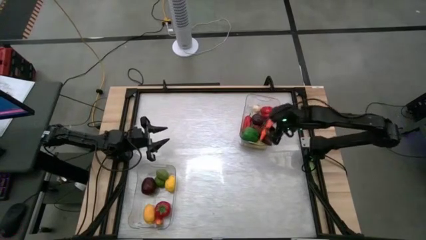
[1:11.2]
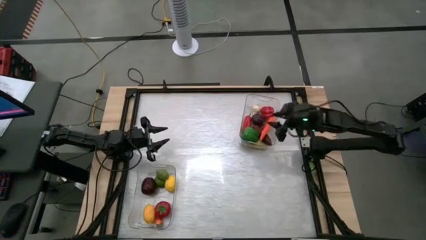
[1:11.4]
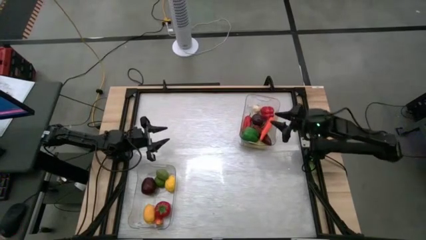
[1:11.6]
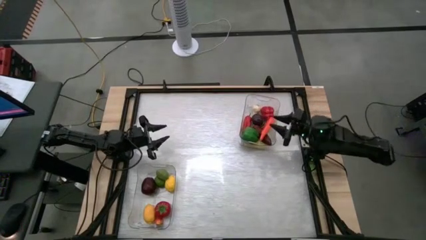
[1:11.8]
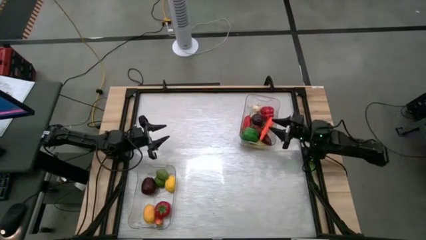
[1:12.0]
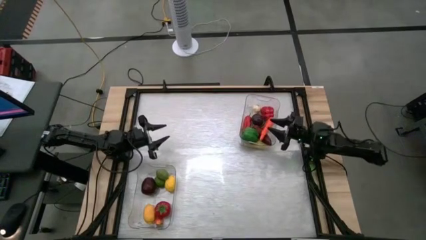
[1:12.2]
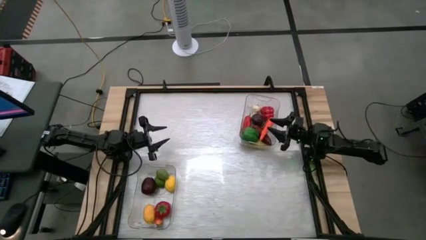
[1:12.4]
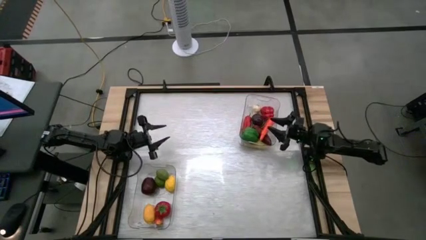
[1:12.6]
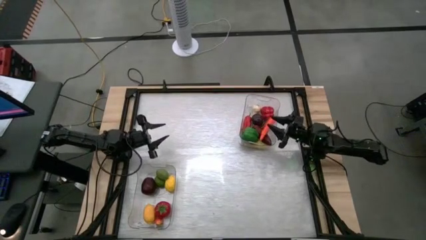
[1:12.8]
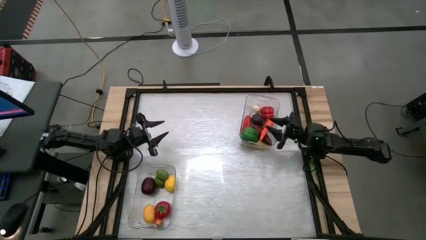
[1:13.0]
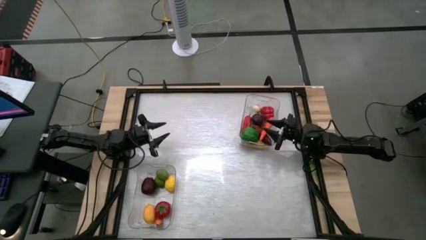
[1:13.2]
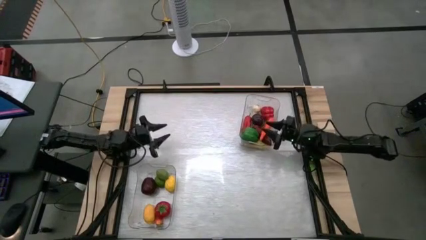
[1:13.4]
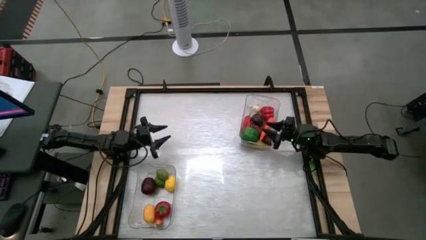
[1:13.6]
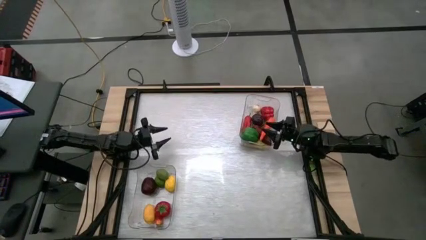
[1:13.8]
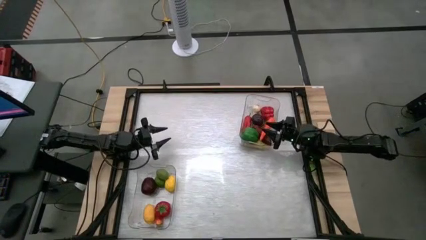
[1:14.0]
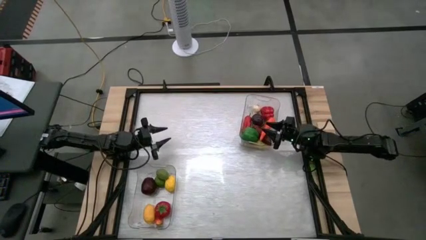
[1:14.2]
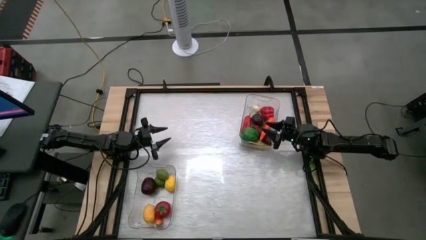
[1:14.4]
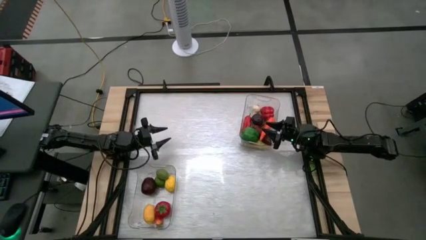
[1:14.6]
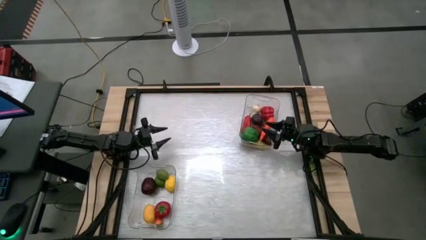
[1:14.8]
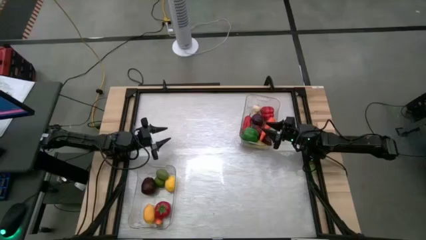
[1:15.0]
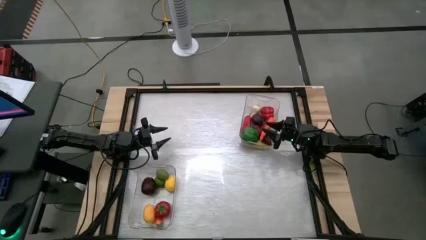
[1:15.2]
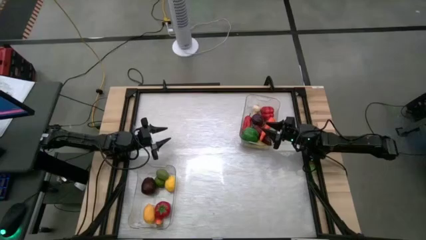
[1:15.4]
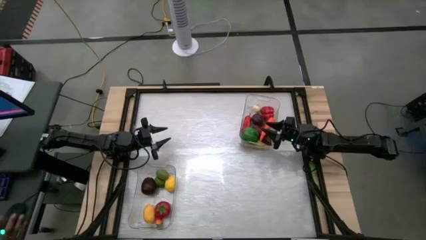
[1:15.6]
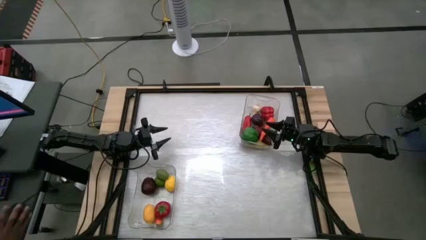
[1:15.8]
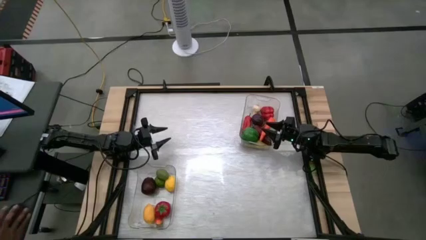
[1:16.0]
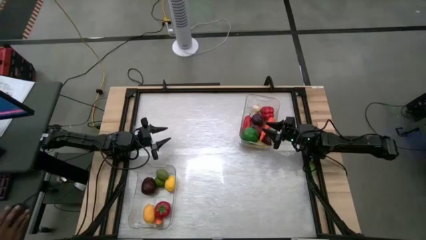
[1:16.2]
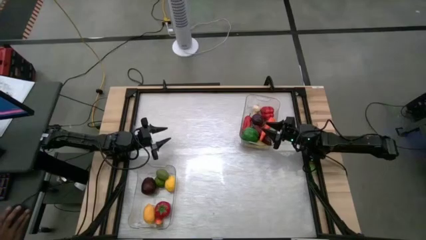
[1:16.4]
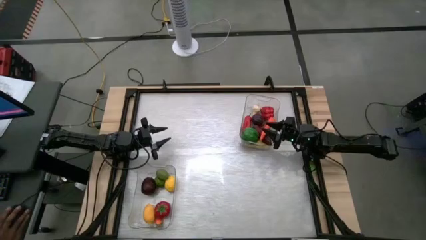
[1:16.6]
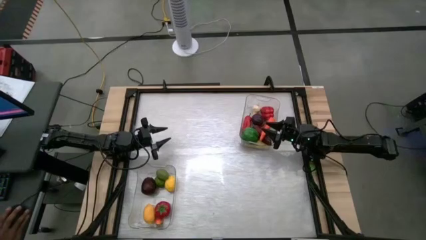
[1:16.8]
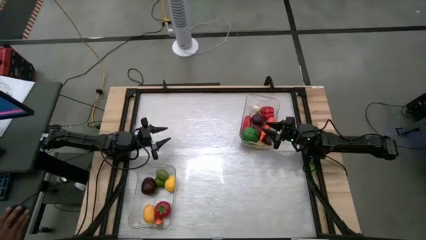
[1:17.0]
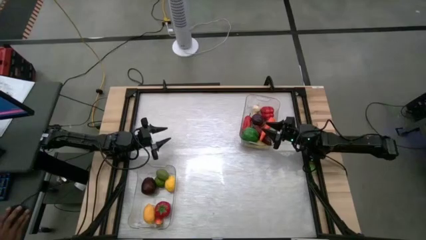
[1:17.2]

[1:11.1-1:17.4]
Task: Sort produce into baskets
Return to Home Position

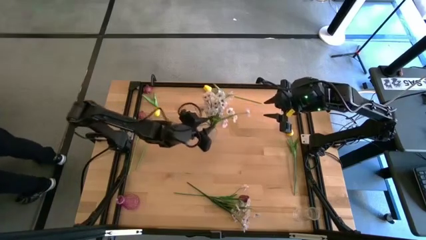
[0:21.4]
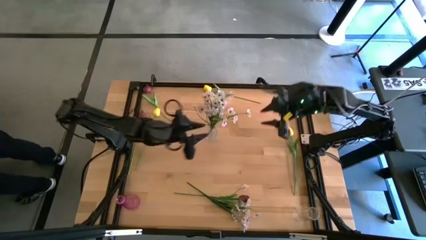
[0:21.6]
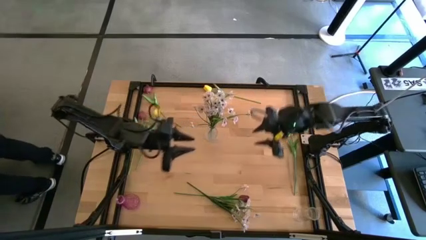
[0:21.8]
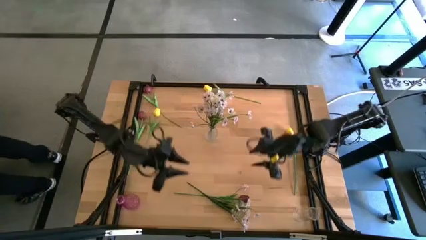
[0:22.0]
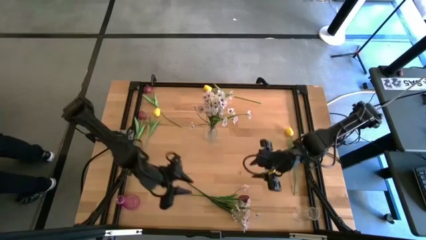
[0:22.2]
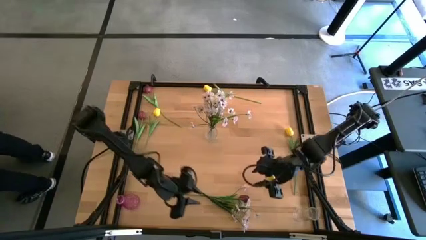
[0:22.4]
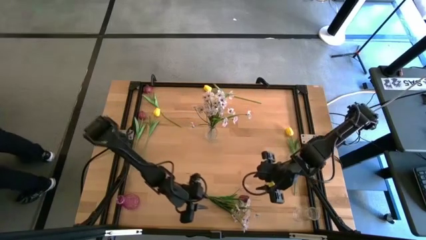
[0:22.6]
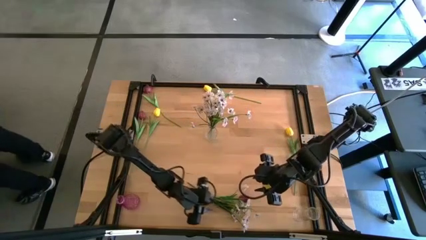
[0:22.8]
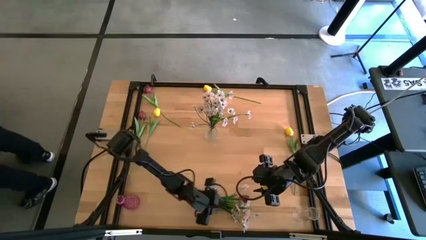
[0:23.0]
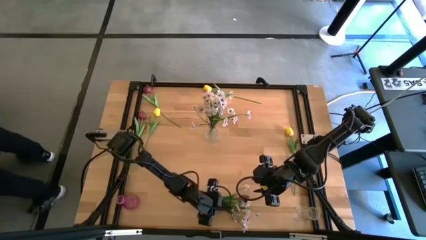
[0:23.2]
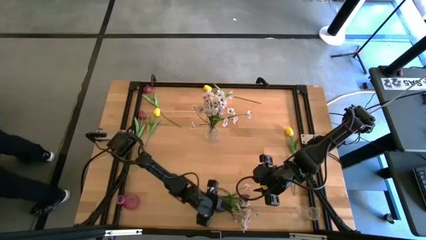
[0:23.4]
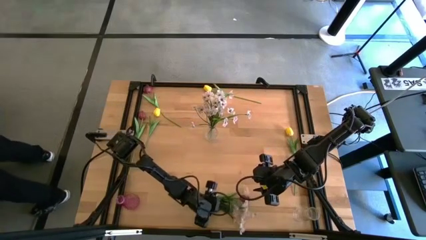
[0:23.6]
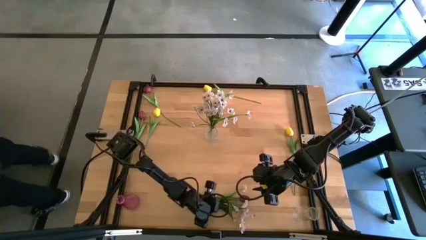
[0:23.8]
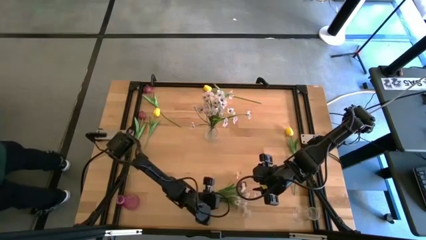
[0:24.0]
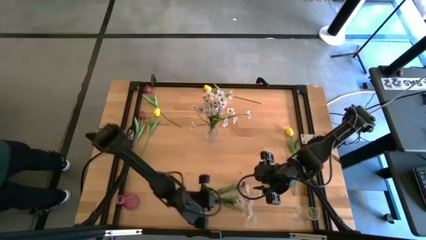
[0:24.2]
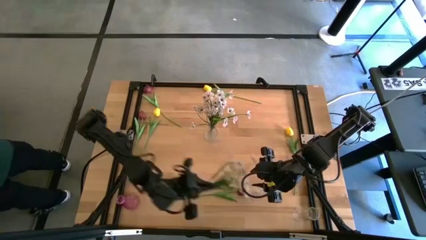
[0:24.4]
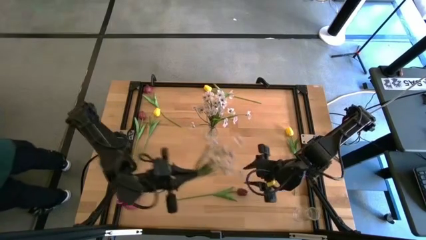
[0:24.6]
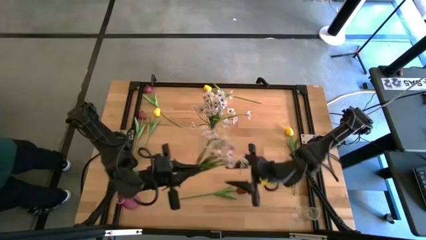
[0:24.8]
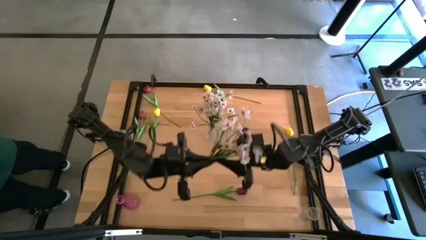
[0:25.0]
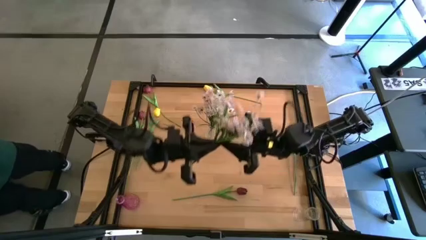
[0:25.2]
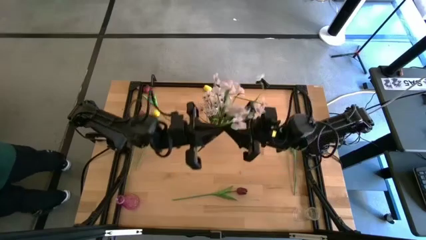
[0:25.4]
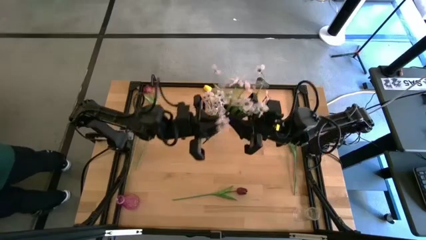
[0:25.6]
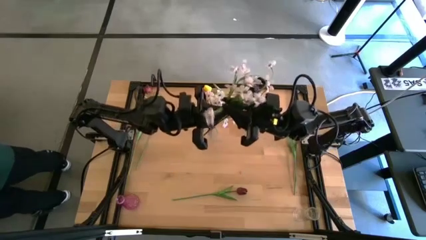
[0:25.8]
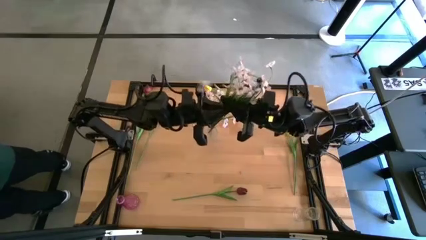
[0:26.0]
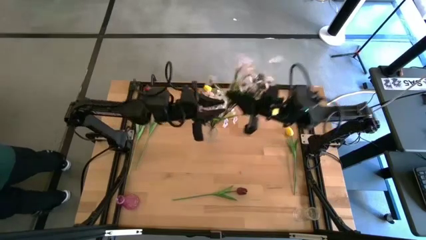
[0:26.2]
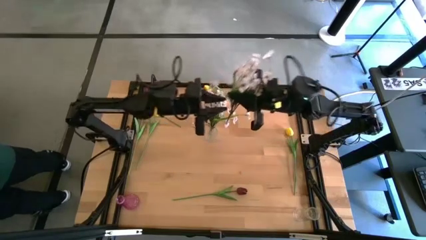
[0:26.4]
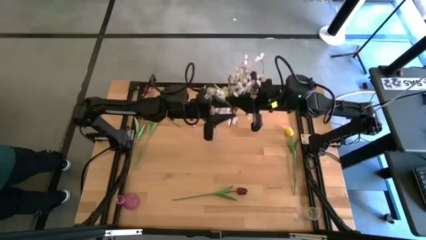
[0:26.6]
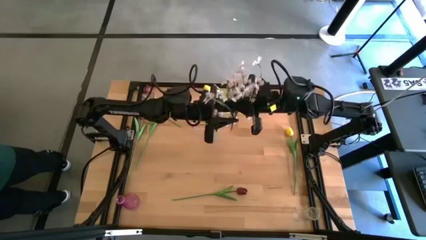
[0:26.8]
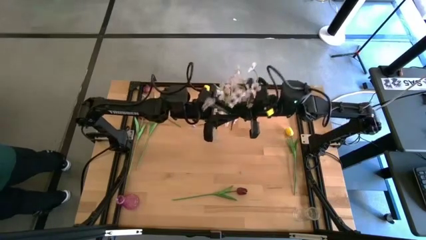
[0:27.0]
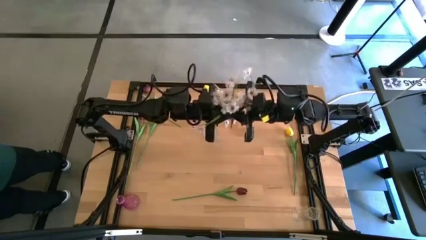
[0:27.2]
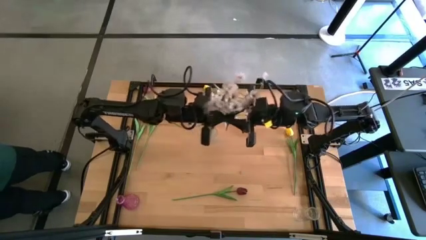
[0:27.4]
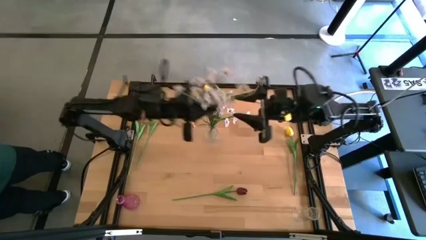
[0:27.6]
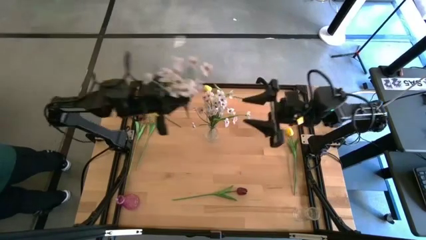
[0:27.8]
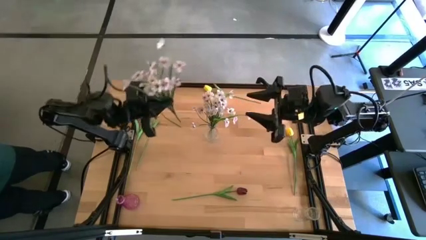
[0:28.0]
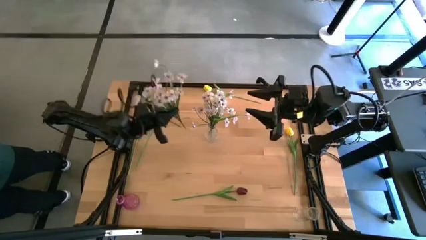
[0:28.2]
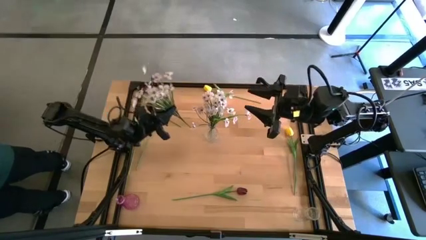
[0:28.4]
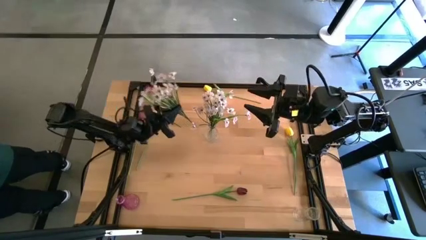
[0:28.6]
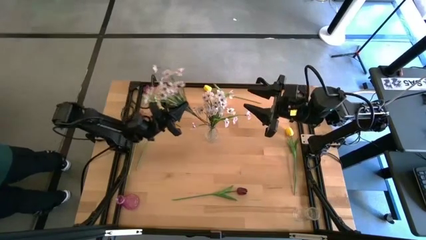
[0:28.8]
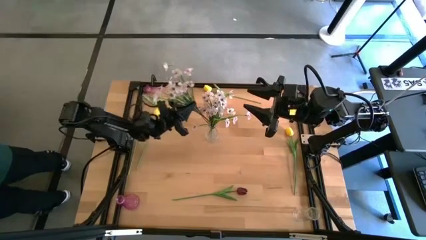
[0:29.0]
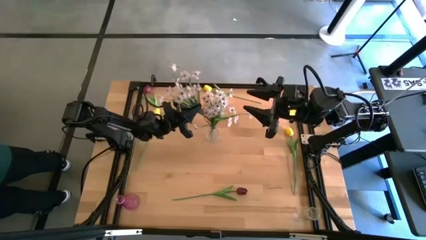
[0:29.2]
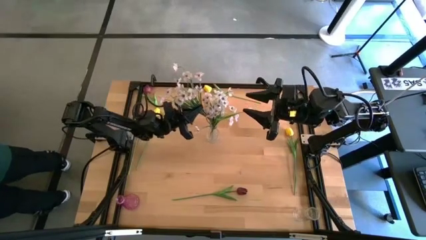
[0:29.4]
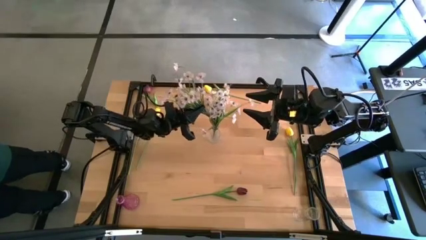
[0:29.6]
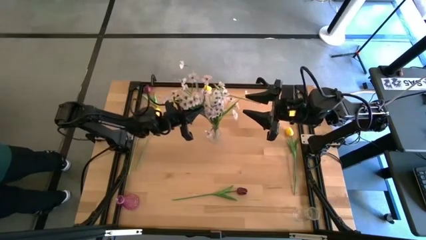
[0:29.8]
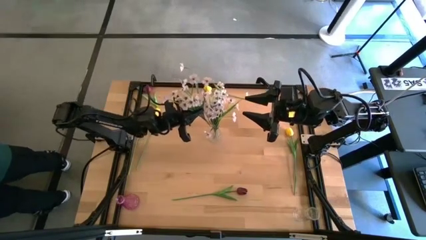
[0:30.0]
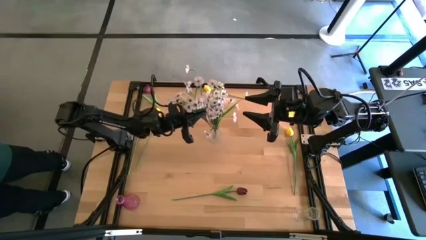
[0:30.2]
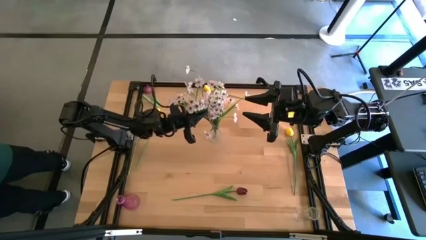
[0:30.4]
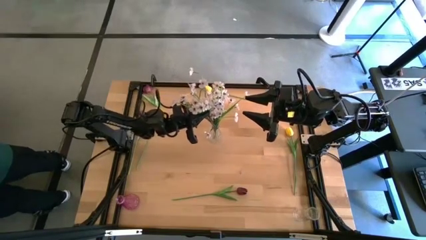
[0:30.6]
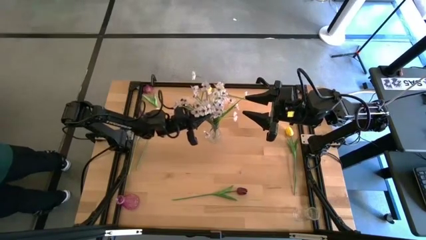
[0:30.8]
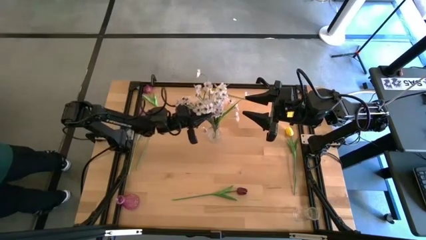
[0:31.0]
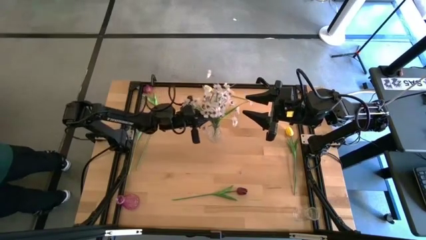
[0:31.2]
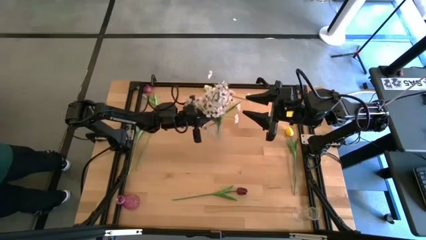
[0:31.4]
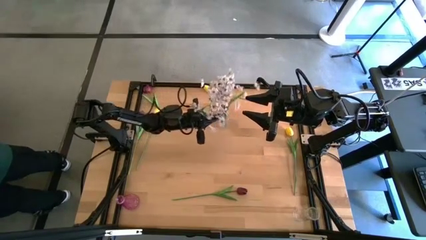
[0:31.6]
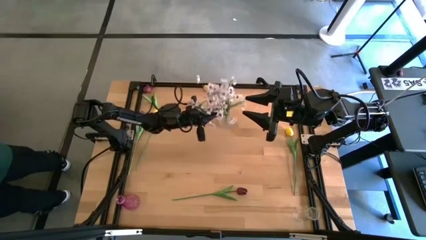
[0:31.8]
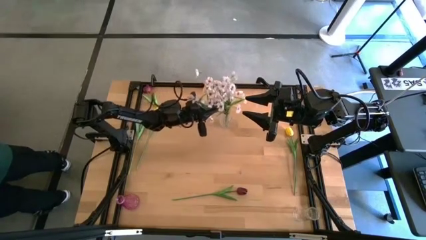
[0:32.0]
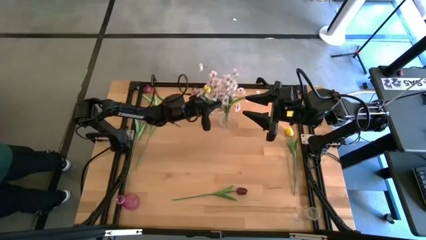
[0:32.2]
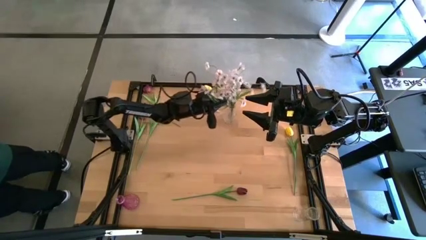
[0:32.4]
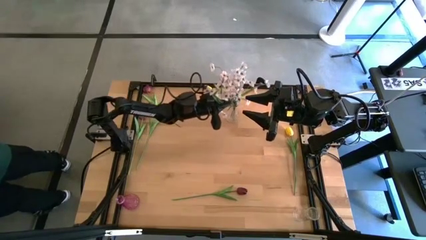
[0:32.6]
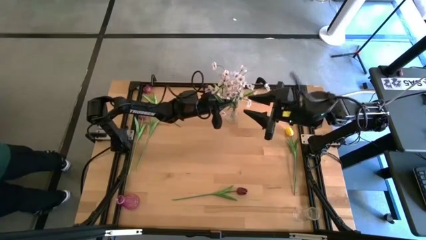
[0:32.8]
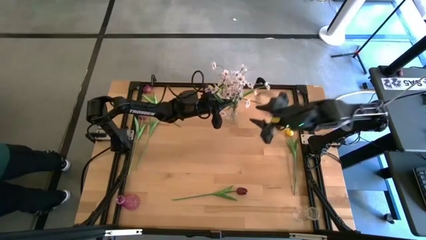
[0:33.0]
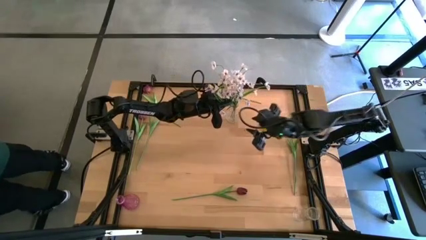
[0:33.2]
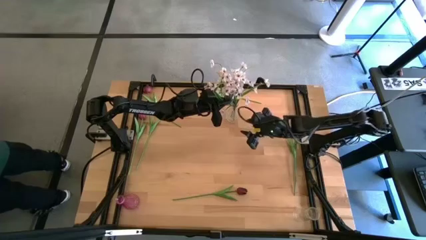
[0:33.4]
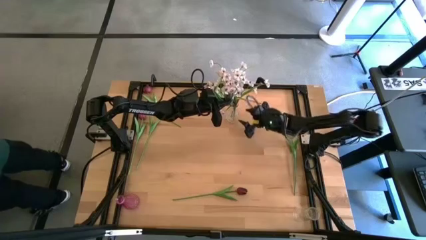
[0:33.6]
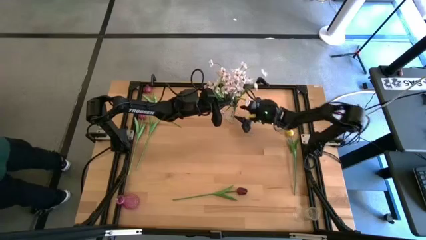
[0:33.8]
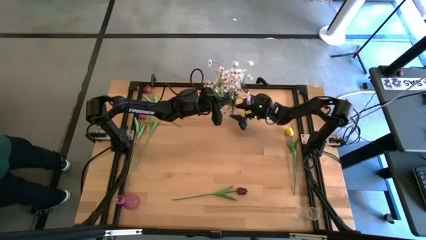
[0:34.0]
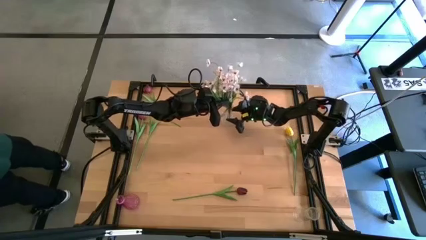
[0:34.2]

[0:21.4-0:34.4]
Task: Sort flowers into vase by color
Put the white flowers into the top transparent vase
